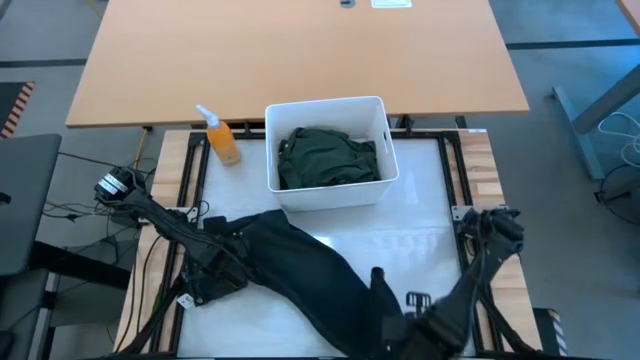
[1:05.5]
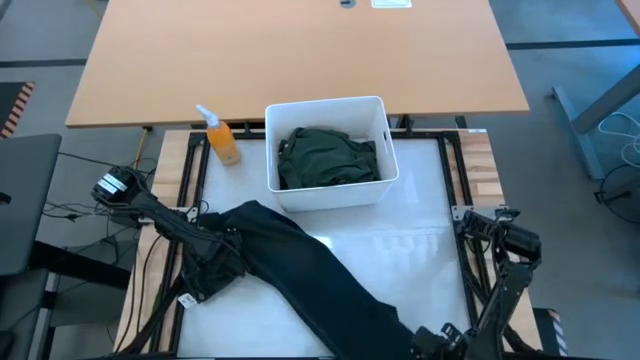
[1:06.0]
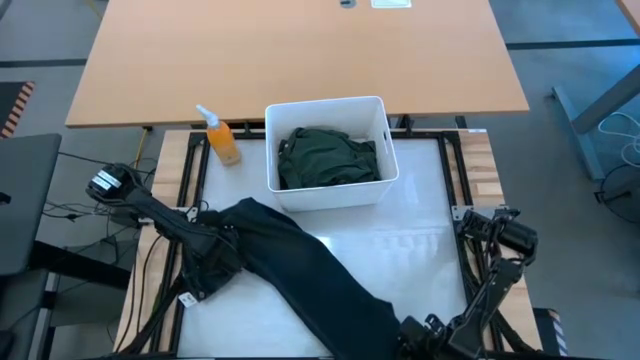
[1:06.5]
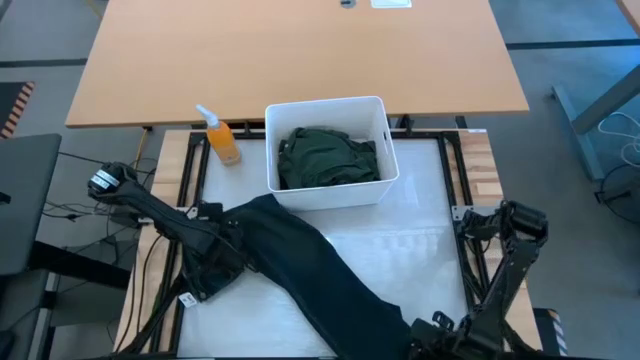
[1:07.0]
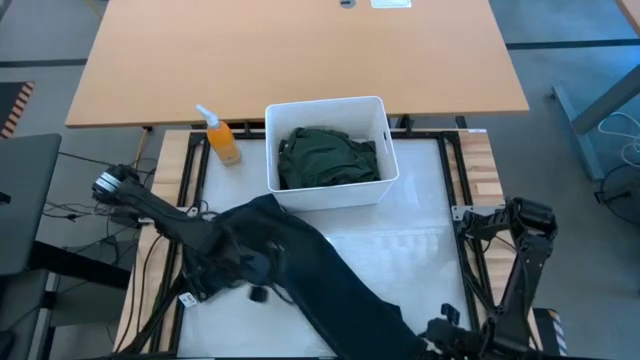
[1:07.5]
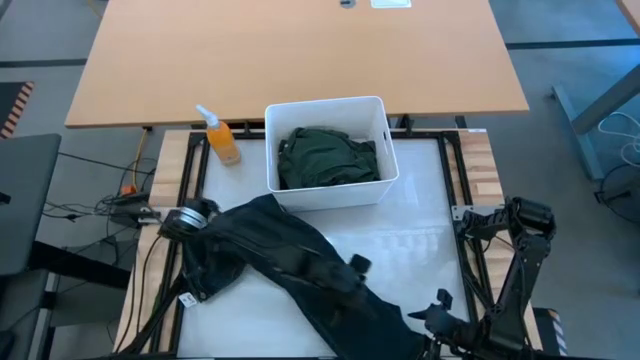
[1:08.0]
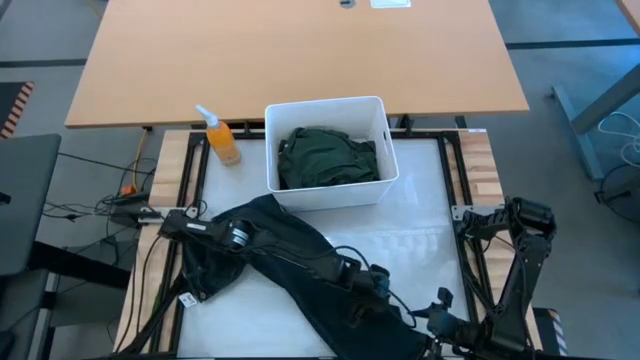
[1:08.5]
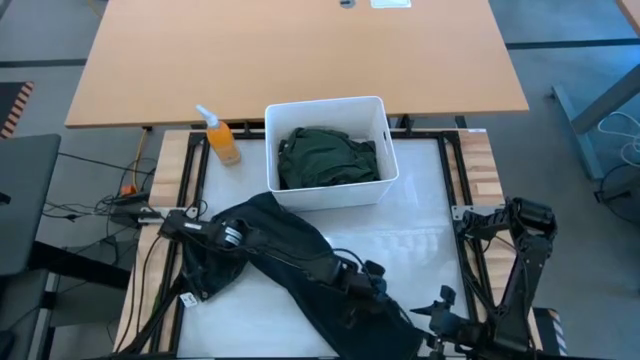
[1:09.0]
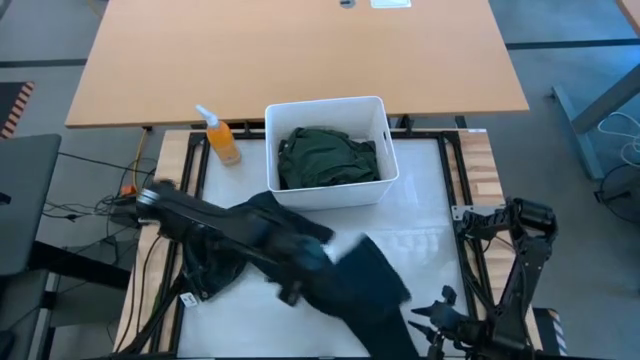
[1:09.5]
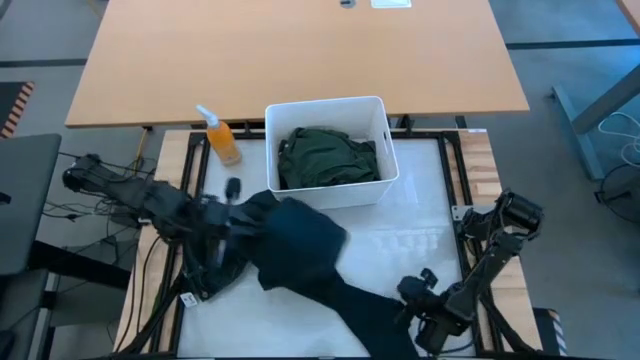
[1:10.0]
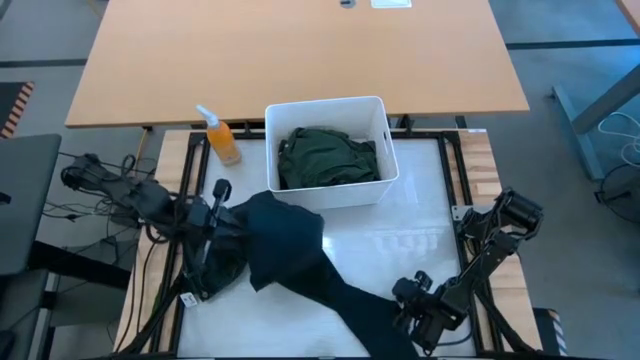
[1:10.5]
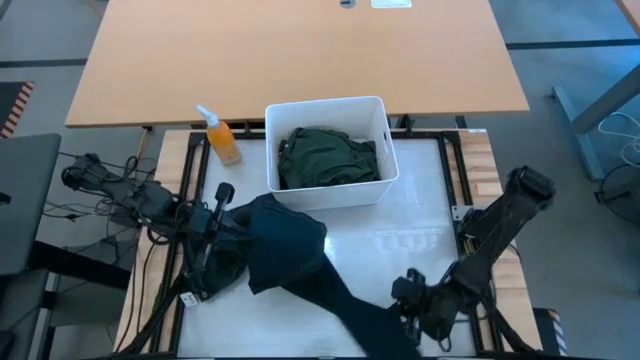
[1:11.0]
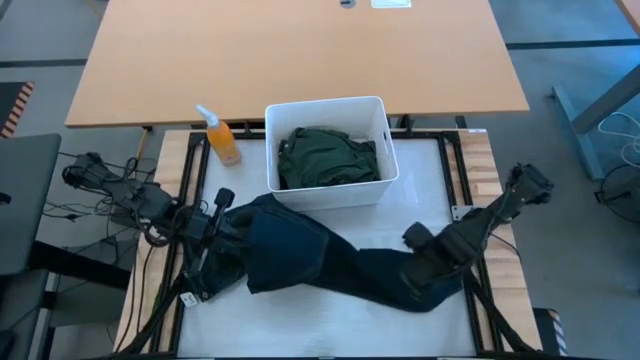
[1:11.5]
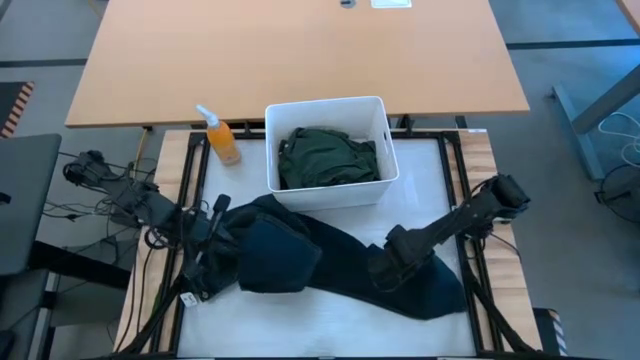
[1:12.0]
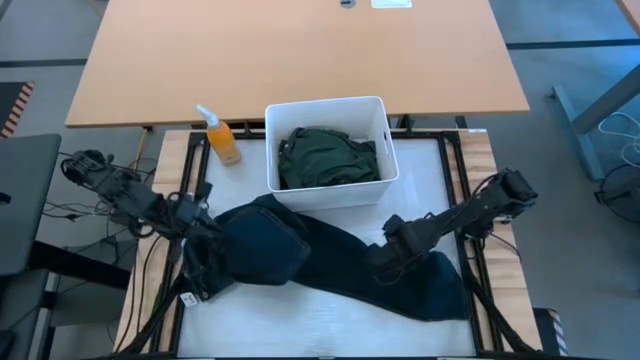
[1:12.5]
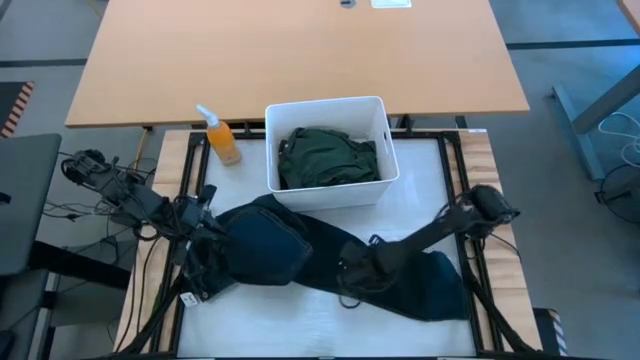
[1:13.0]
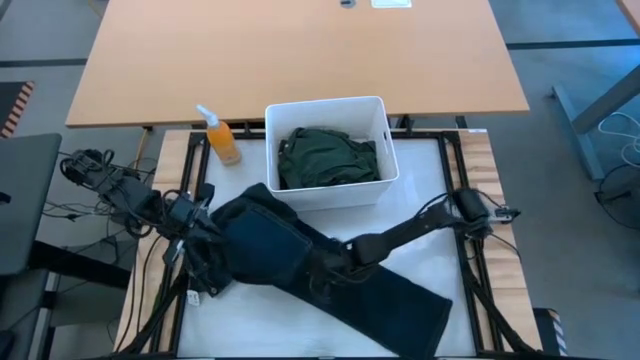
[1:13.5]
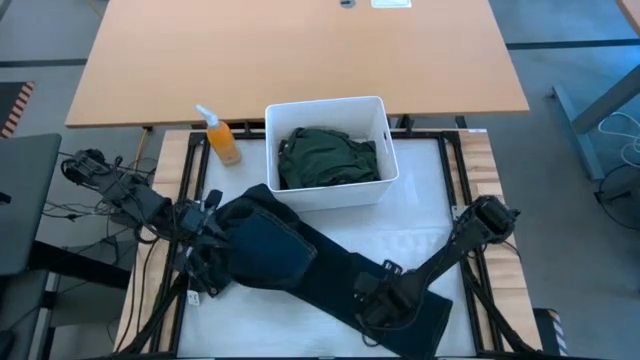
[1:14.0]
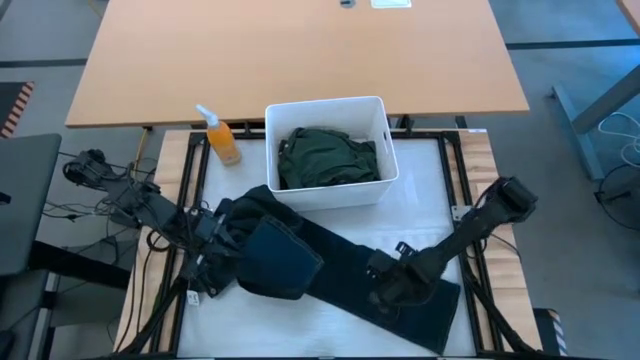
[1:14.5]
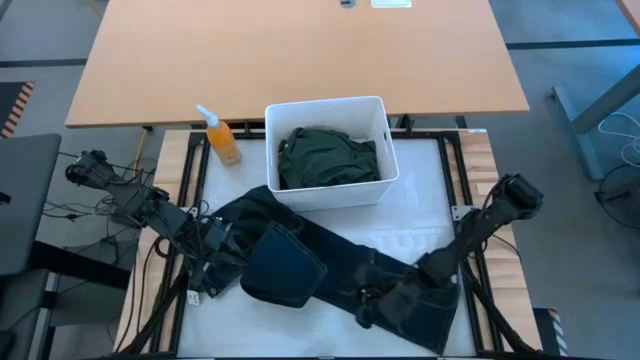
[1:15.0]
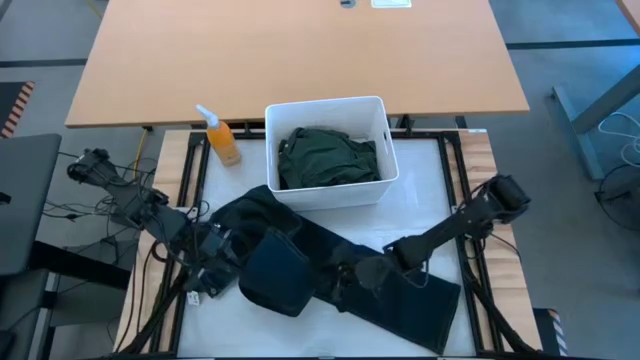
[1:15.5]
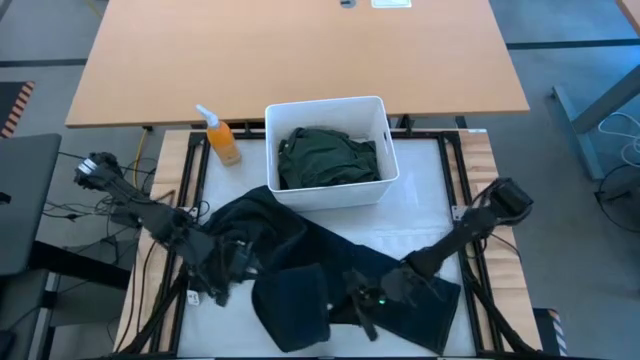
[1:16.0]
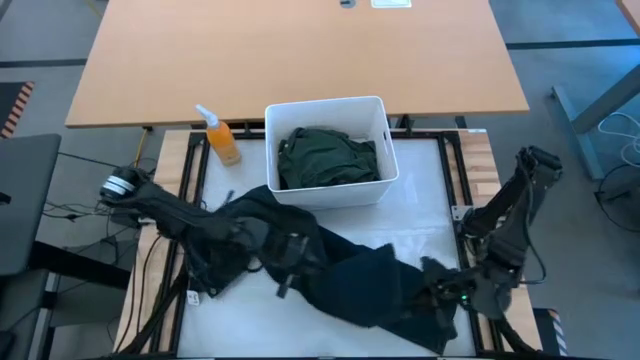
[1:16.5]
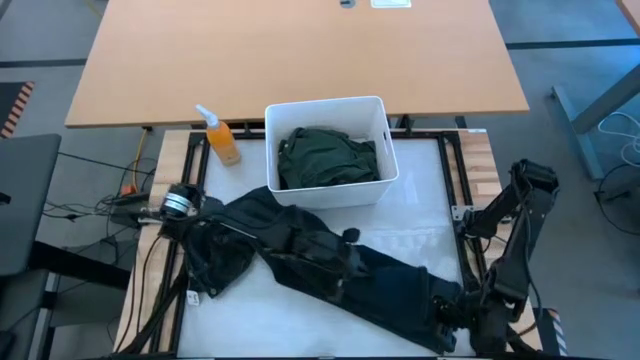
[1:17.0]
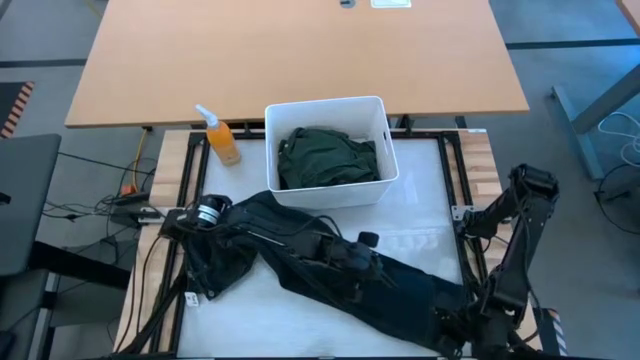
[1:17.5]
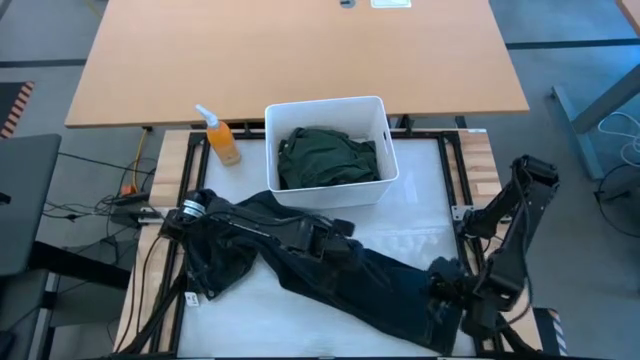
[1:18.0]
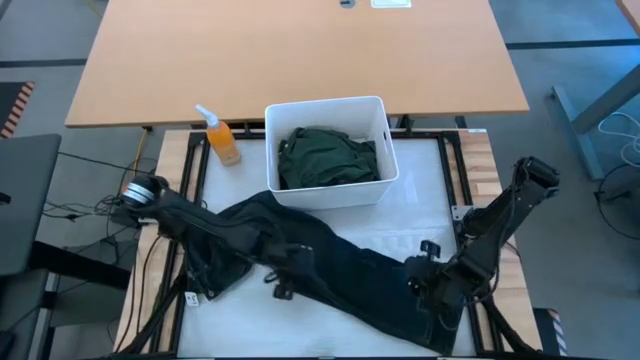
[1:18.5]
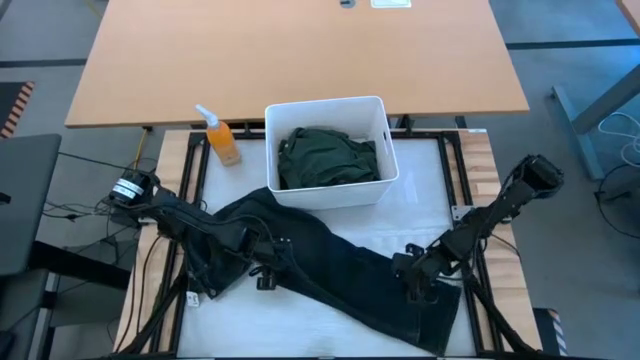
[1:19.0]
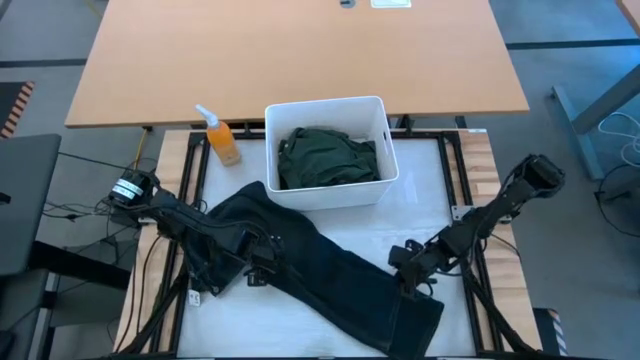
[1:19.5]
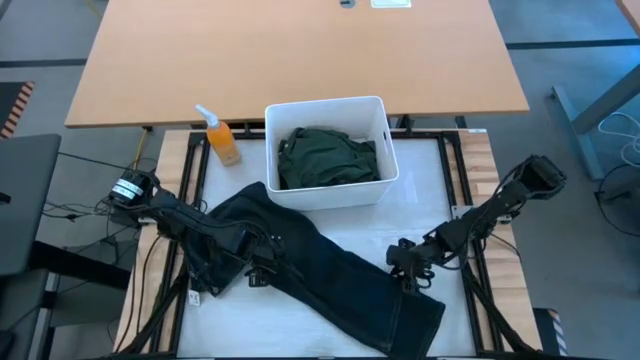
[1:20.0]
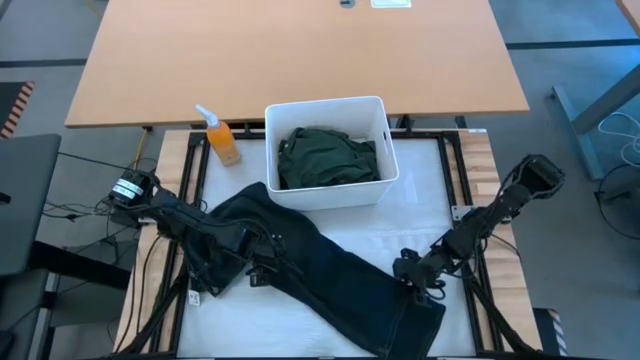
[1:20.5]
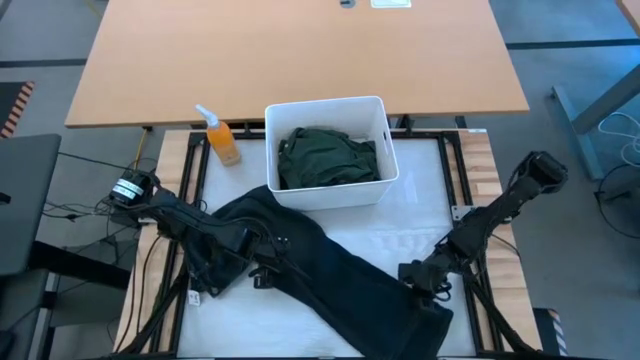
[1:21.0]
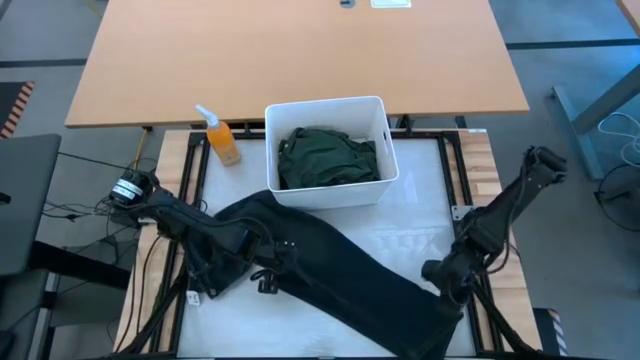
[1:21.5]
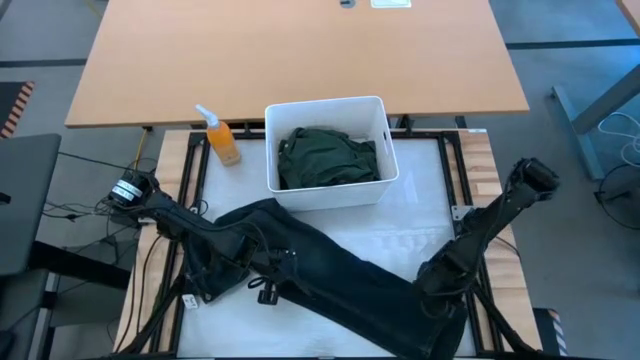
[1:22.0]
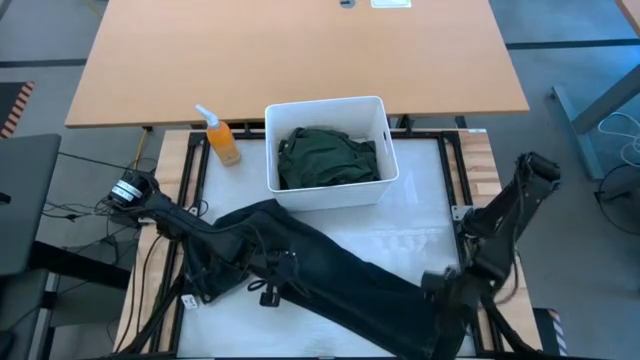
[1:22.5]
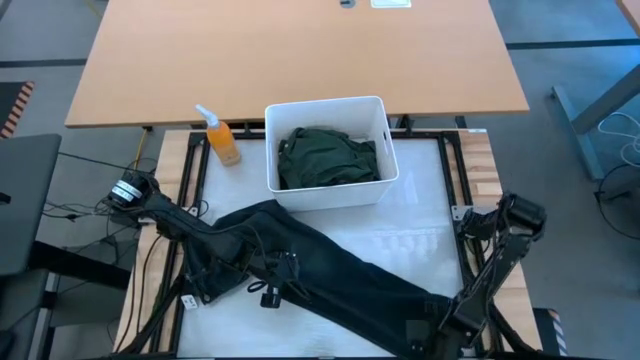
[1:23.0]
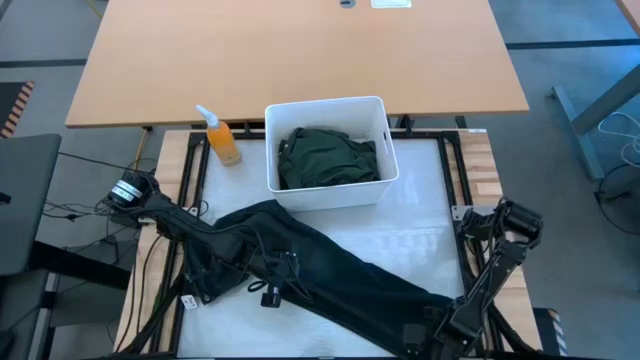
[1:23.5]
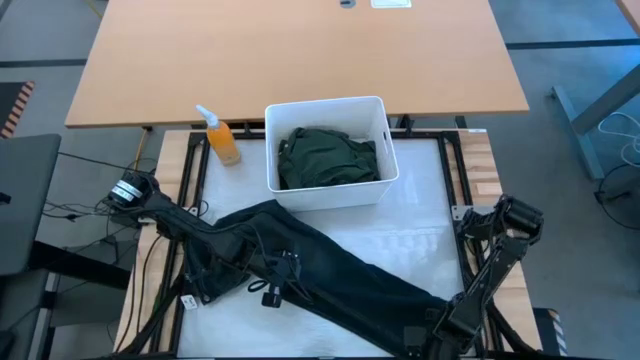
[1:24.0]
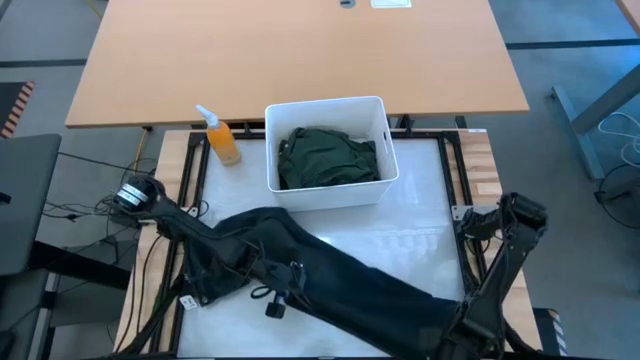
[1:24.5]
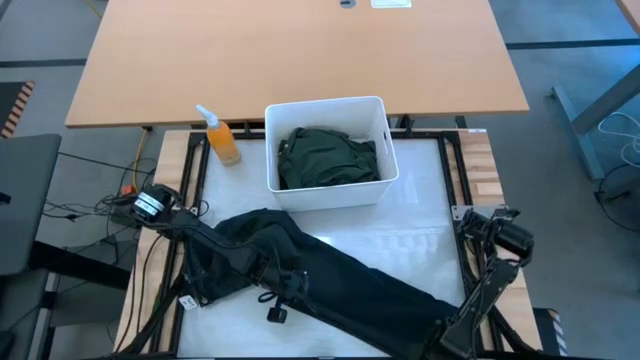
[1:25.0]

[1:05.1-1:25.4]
Task: Fold laundry
Fold the dark blue jeans
